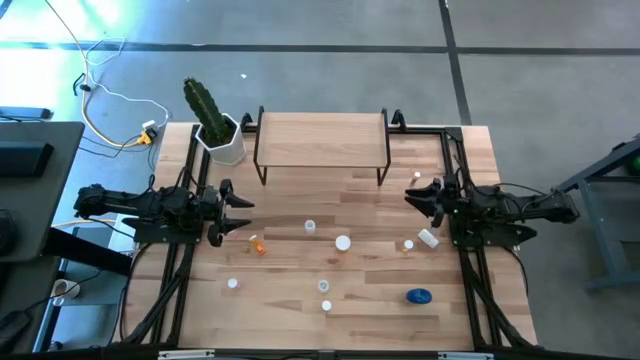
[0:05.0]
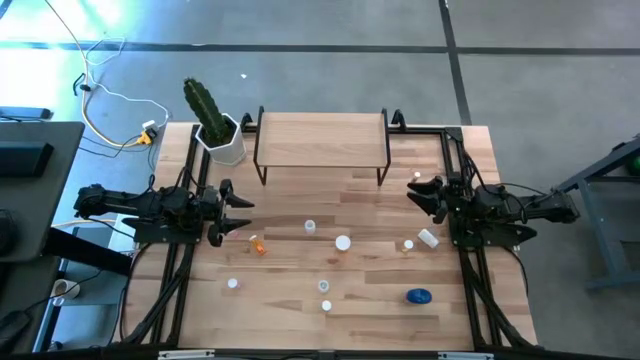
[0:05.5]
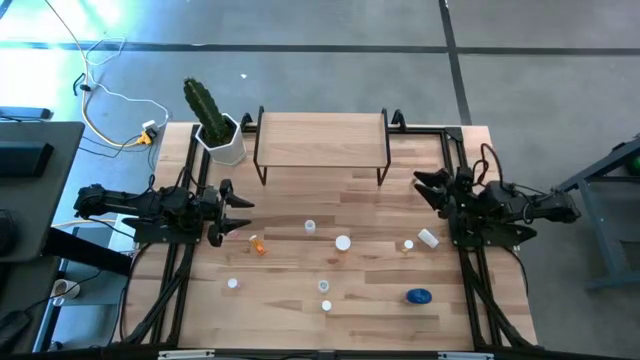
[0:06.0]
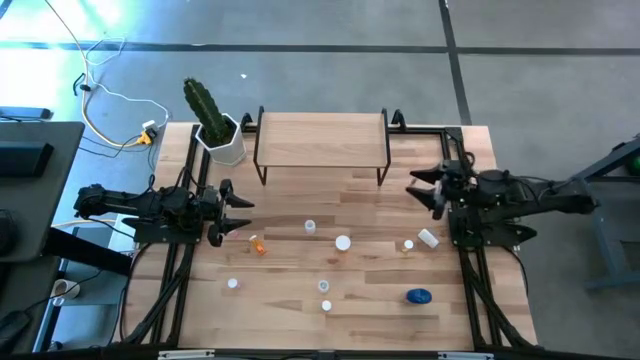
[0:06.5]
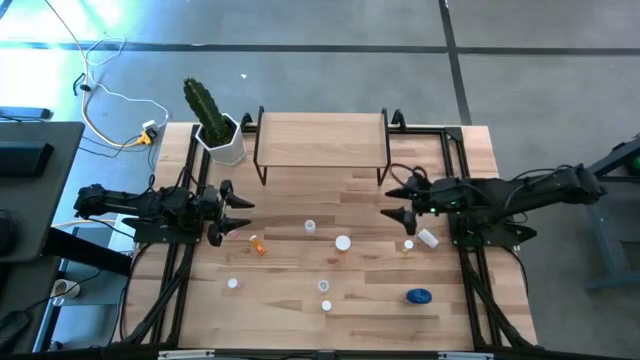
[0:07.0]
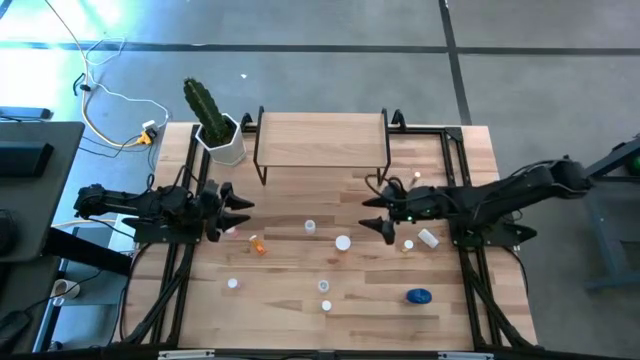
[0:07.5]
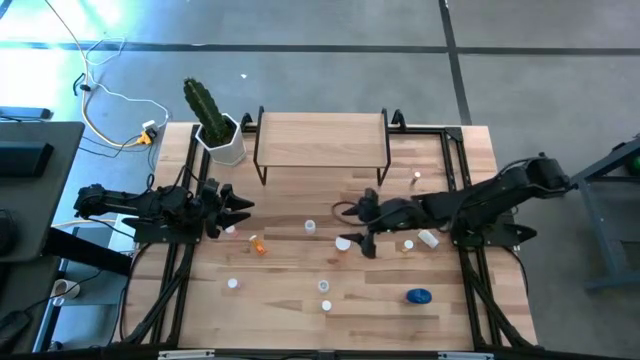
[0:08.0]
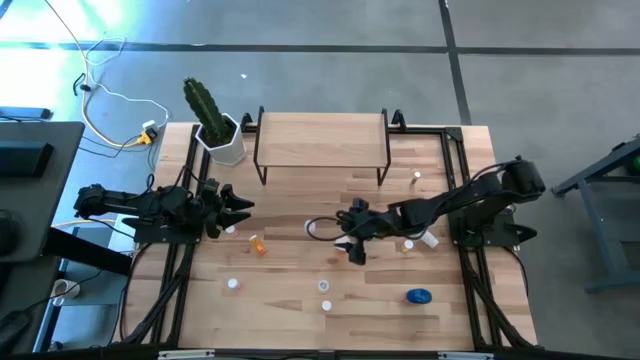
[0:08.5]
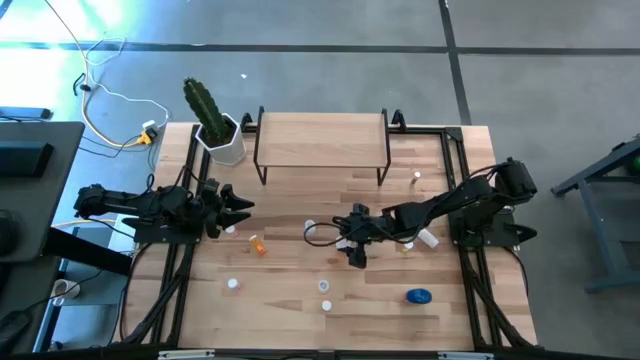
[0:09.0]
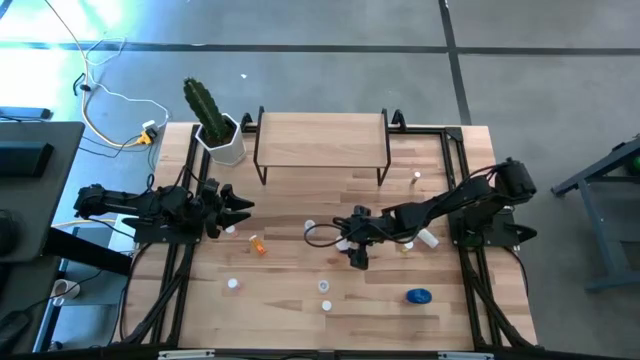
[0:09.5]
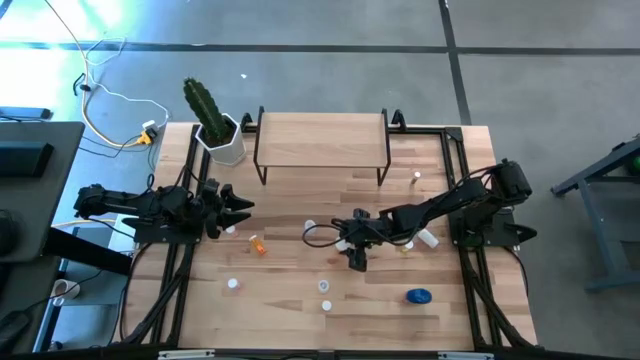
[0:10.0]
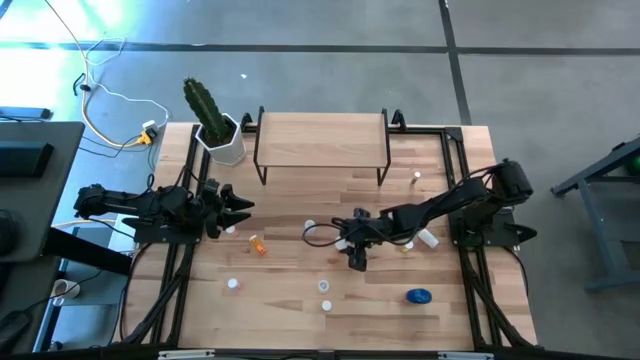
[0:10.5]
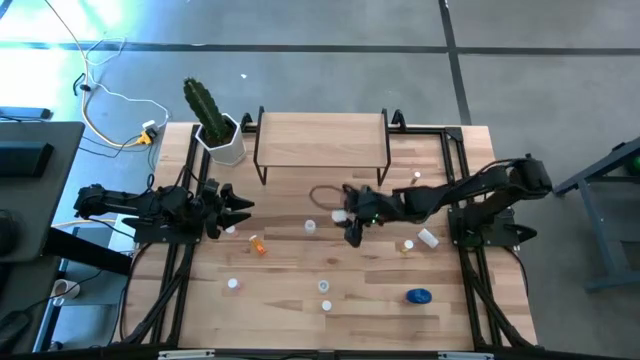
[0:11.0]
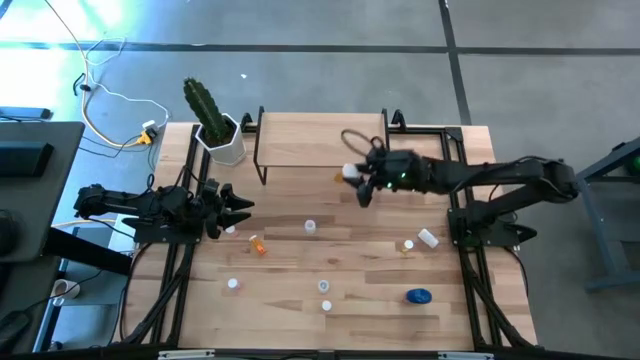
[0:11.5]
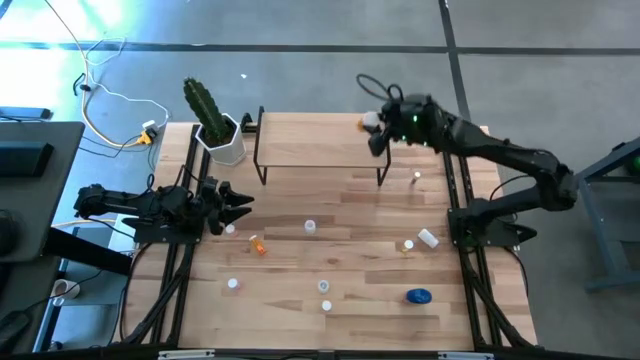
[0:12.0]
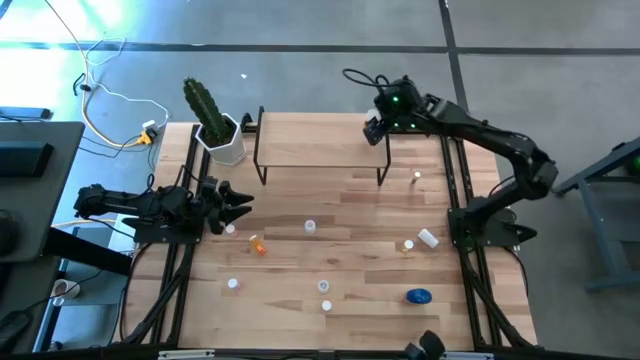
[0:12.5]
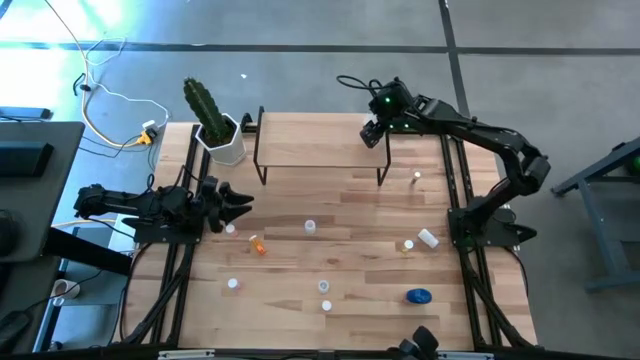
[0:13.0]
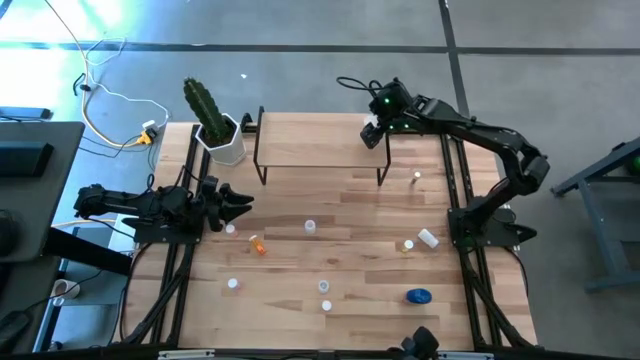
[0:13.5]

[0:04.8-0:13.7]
Task: Pick and place medicine bottles onto shelf by color
Put the large orange pill bottle on the shelf

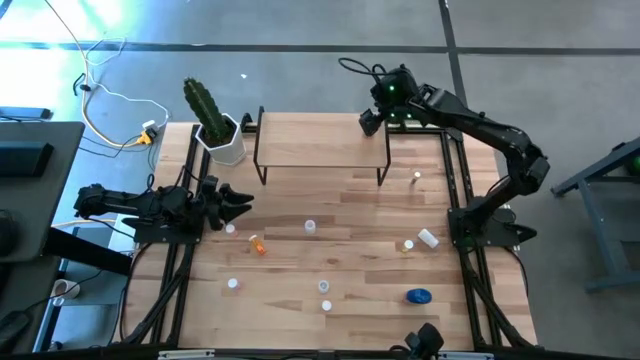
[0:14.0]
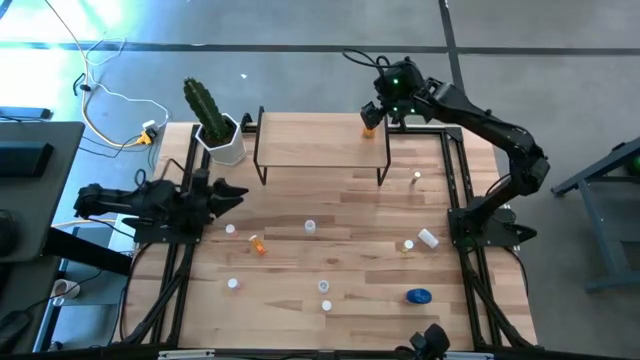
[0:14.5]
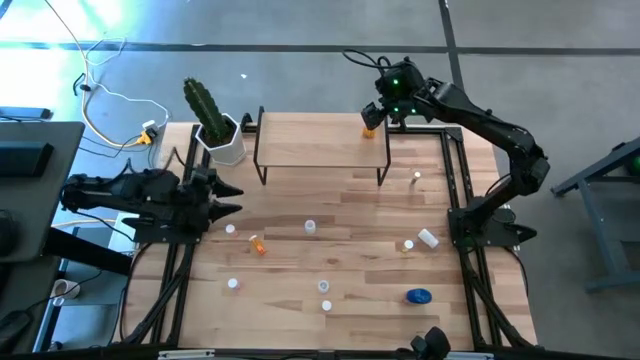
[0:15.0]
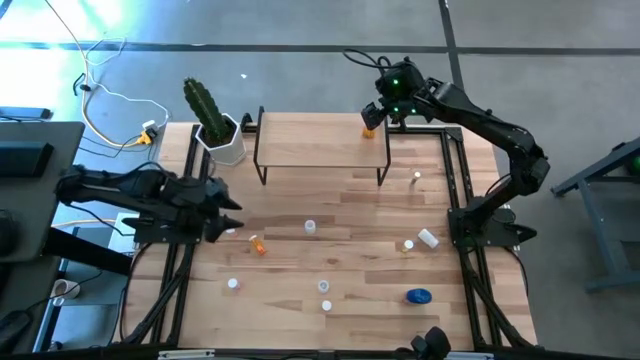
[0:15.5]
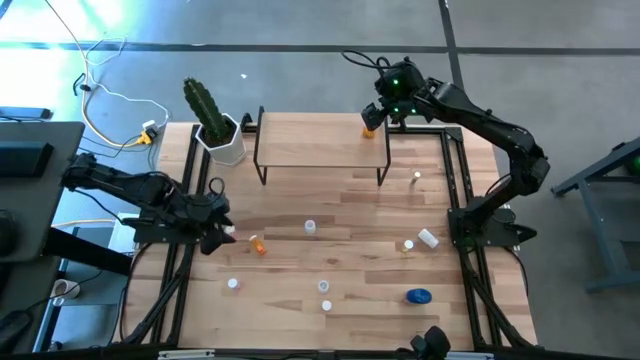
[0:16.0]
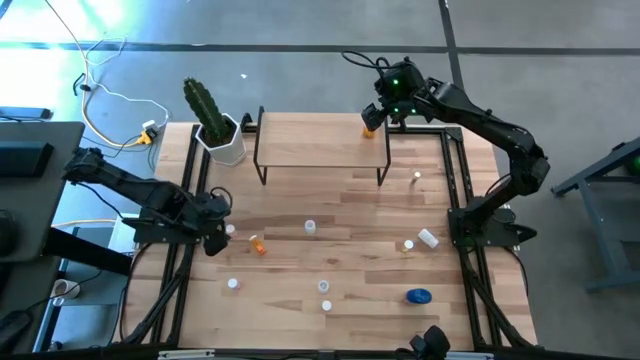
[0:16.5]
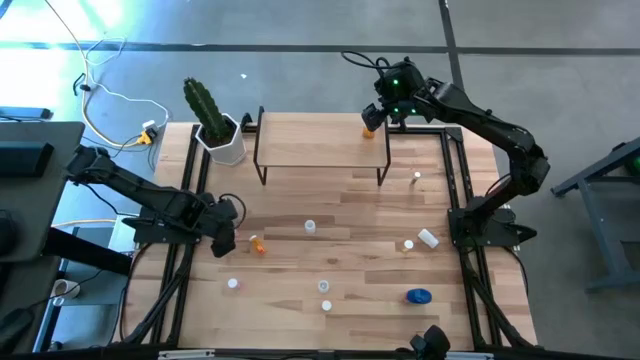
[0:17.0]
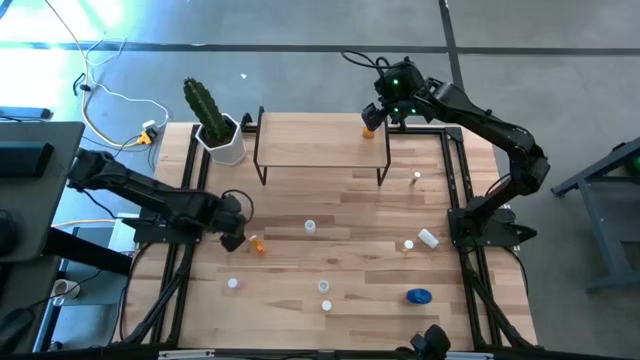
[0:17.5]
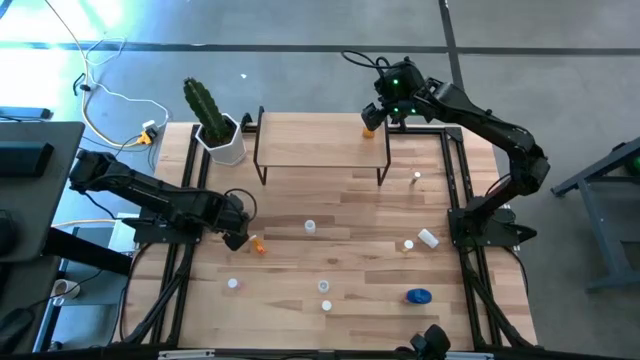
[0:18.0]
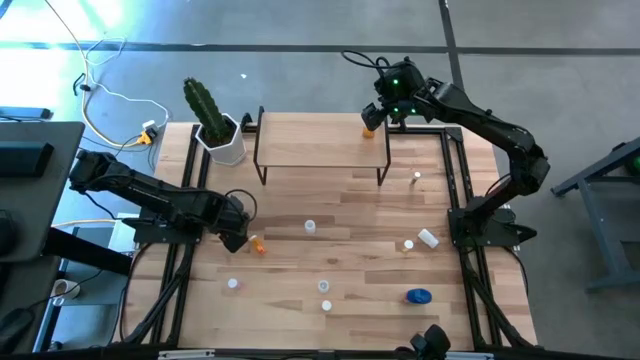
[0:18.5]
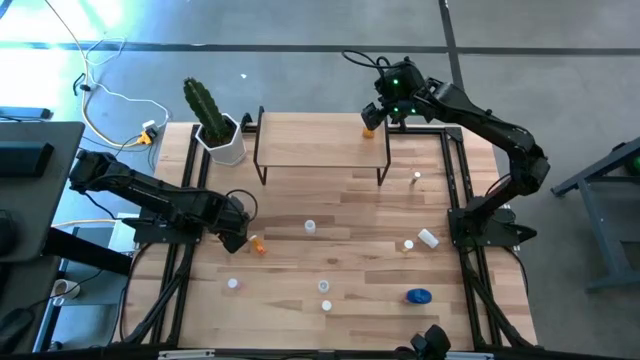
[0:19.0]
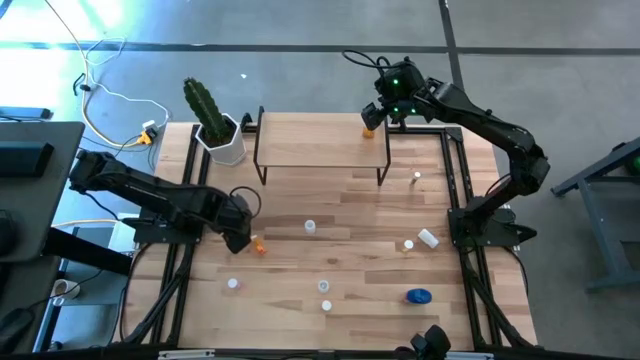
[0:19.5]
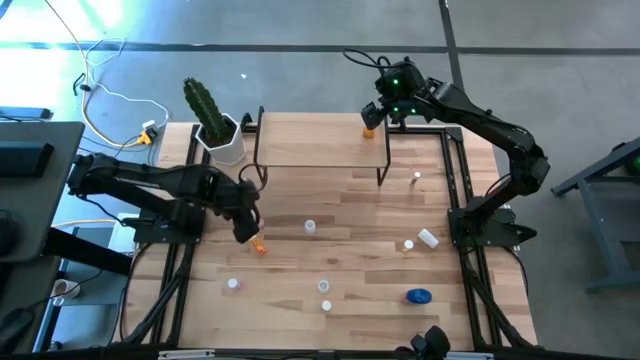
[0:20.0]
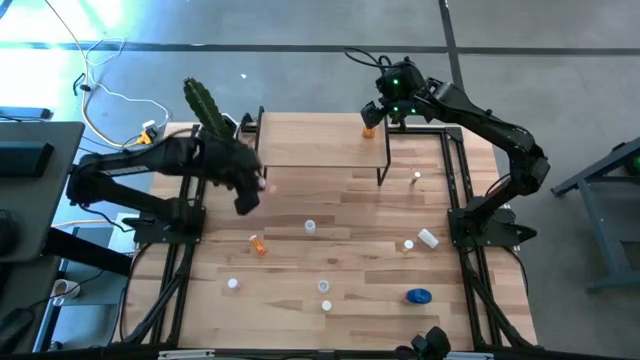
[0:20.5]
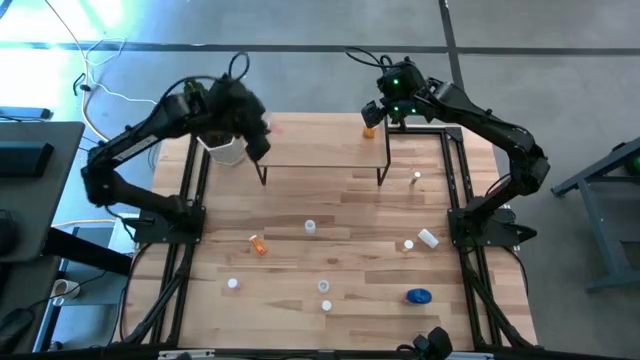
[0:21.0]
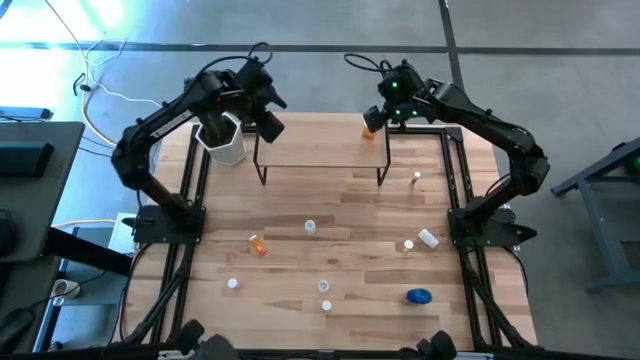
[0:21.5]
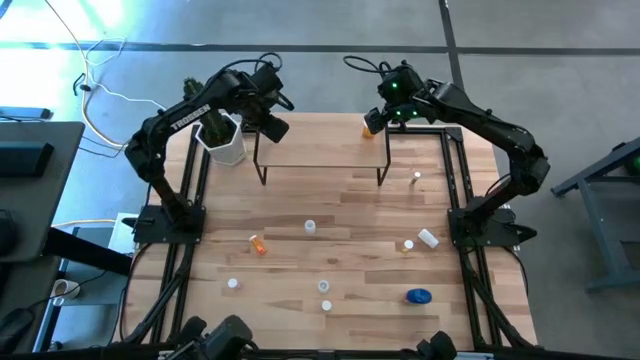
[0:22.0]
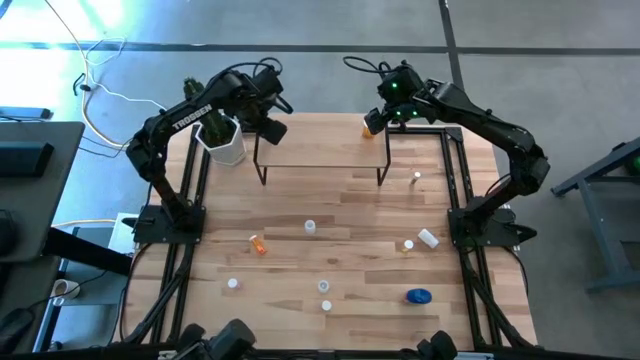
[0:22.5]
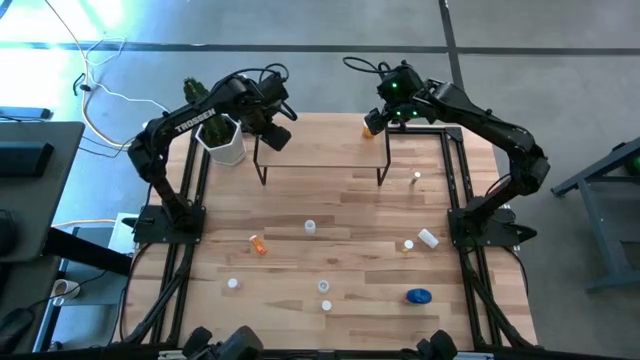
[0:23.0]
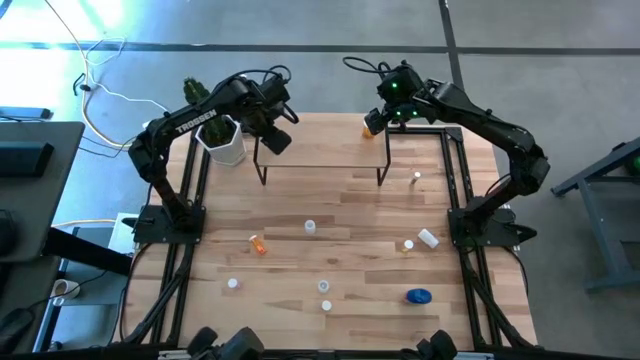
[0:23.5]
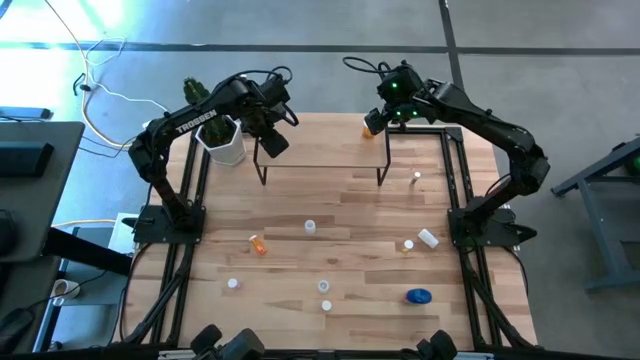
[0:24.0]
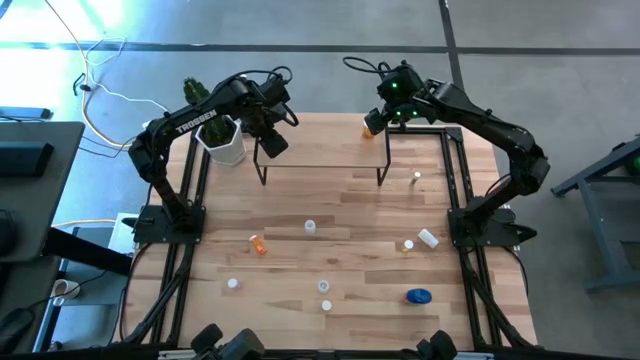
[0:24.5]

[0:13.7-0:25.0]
Put the top pink pill bottle on the shelf

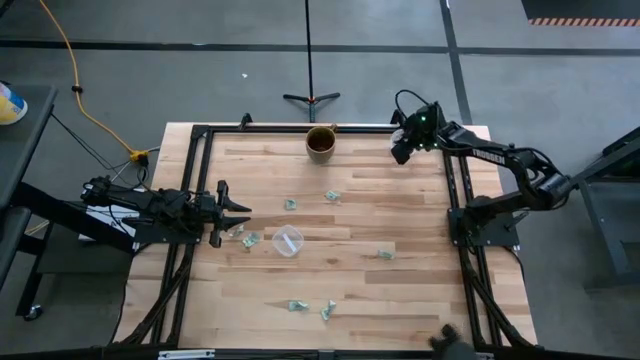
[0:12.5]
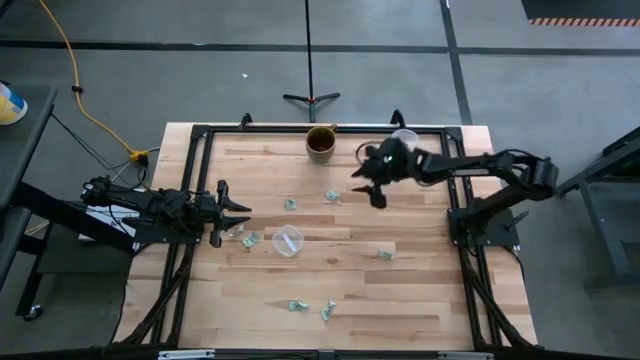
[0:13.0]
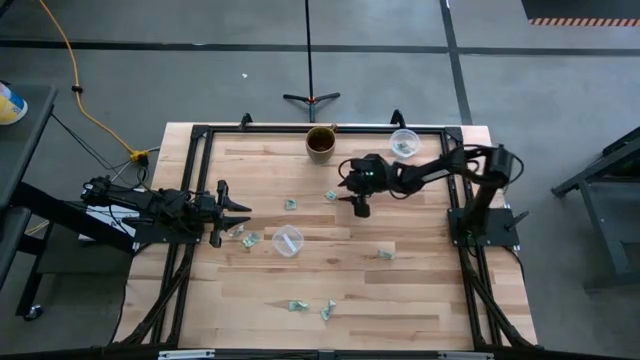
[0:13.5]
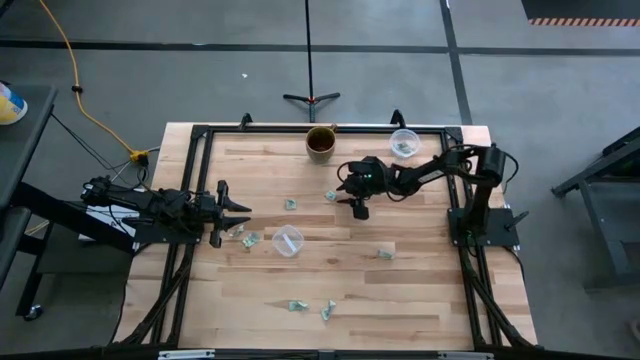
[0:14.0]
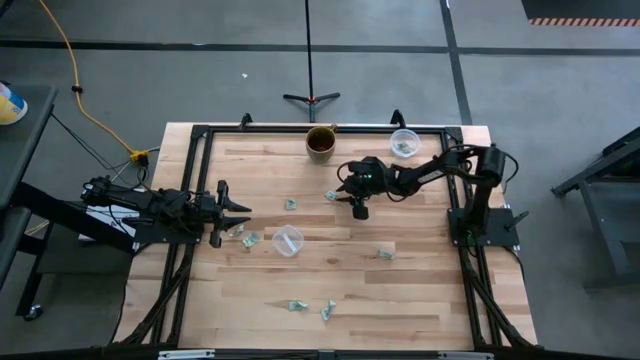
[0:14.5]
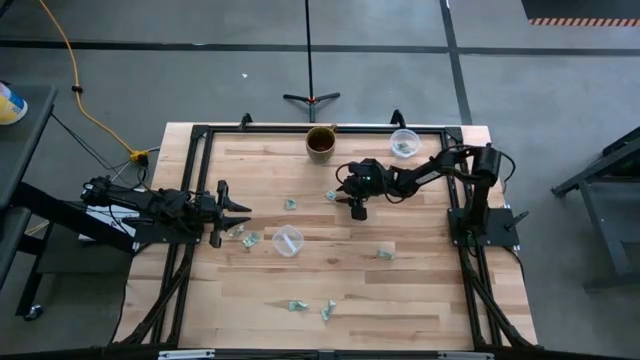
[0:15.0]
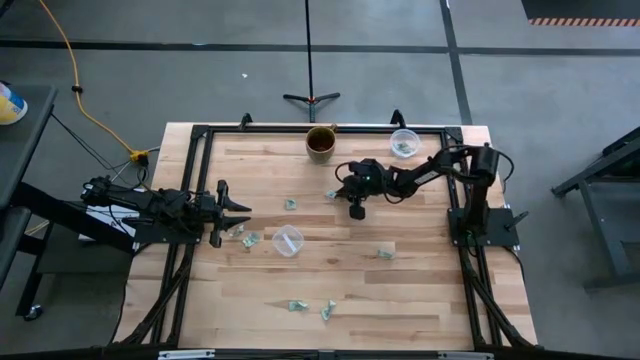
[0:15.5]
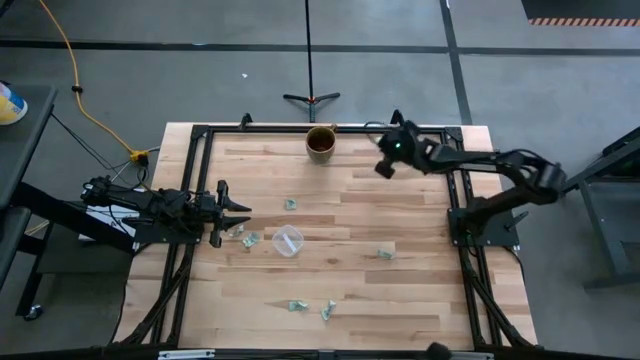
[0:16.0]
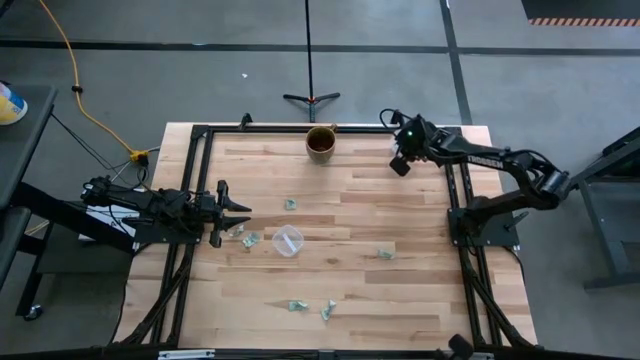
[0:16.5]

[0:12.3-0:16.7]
Task: Pick and place items into bin
Put the stevia packet into the top transparent bin
